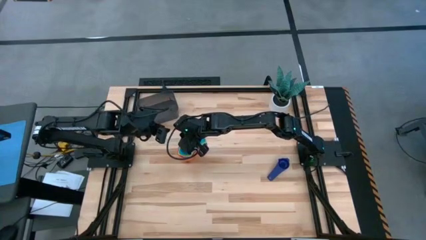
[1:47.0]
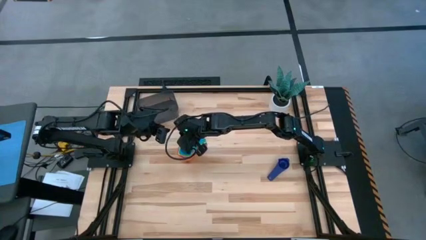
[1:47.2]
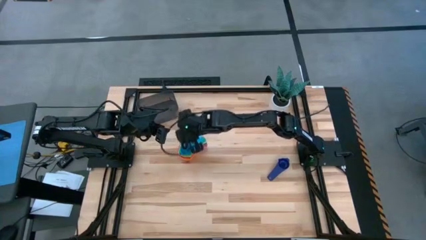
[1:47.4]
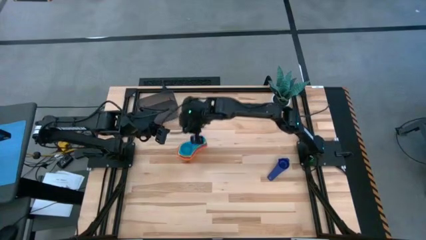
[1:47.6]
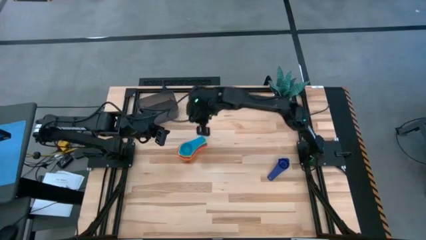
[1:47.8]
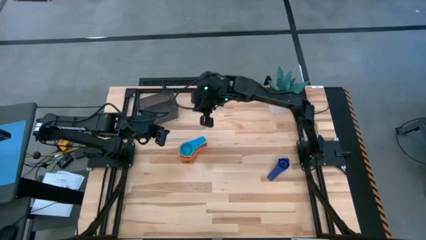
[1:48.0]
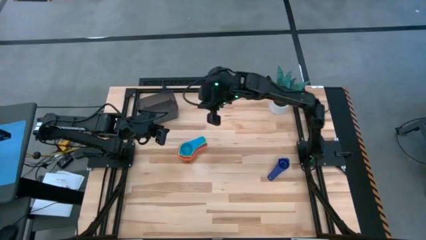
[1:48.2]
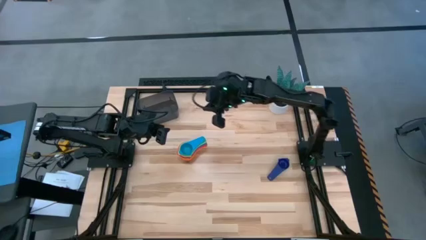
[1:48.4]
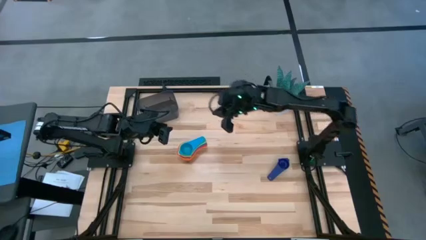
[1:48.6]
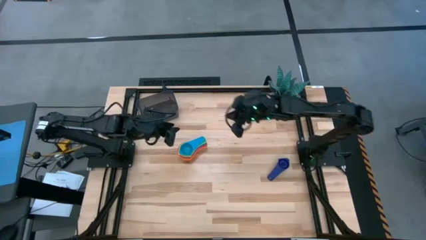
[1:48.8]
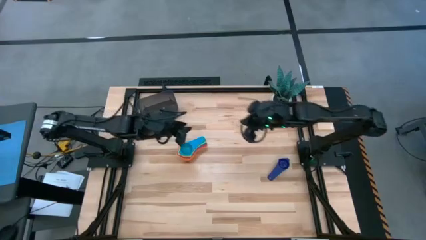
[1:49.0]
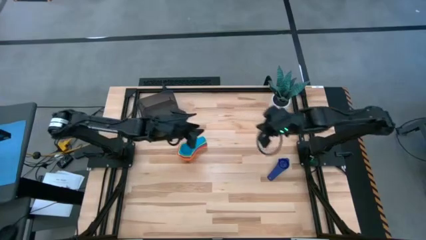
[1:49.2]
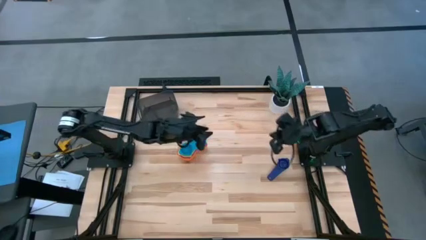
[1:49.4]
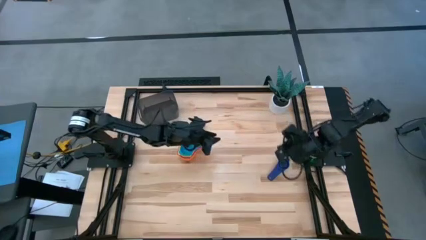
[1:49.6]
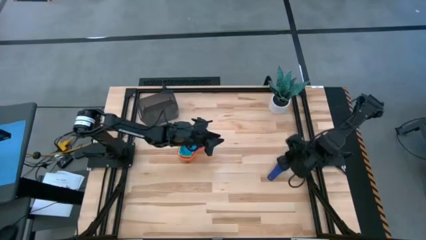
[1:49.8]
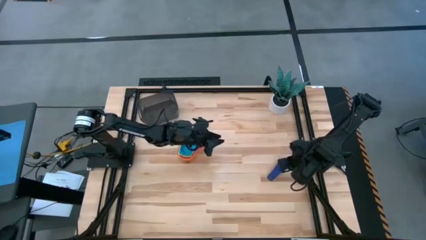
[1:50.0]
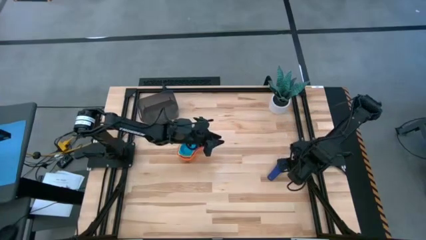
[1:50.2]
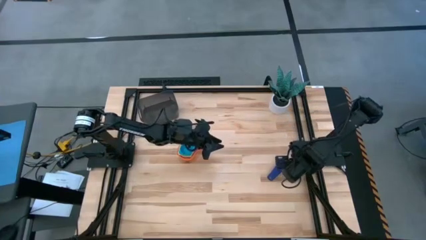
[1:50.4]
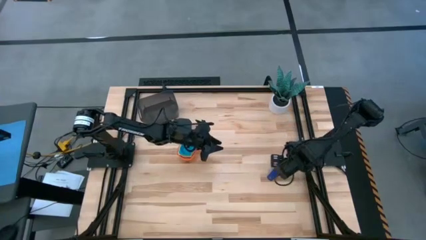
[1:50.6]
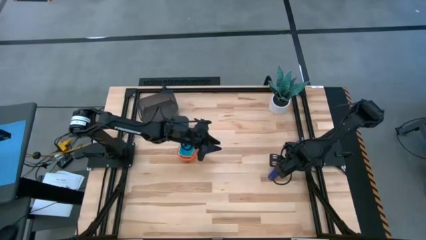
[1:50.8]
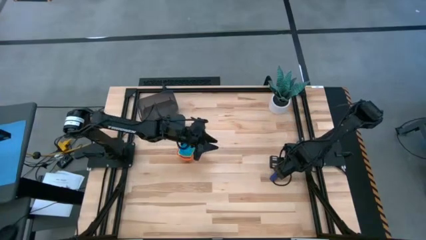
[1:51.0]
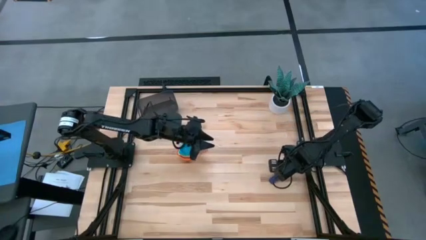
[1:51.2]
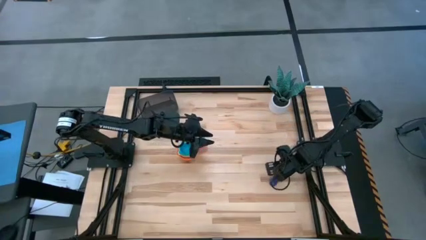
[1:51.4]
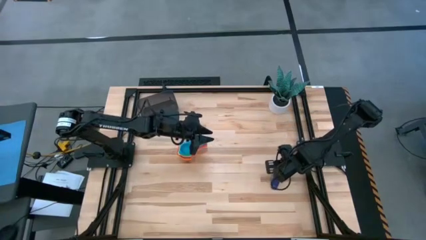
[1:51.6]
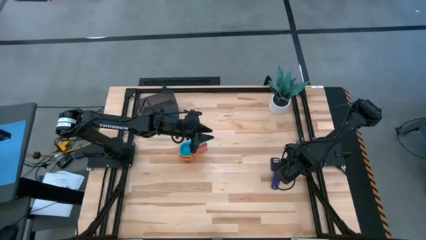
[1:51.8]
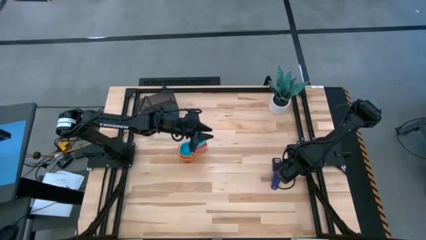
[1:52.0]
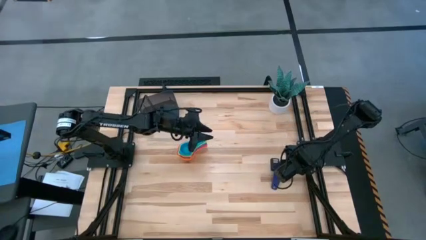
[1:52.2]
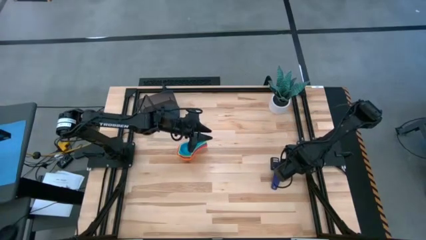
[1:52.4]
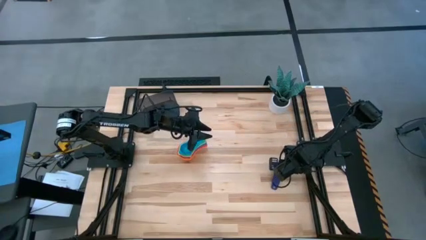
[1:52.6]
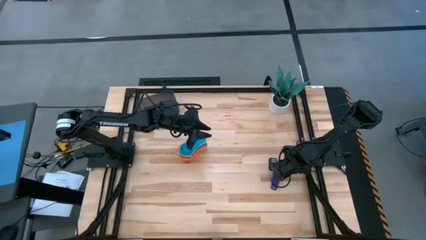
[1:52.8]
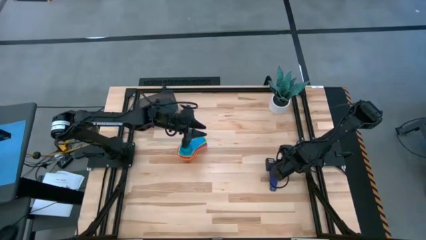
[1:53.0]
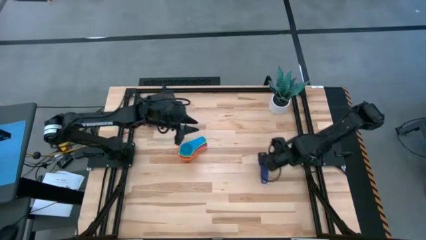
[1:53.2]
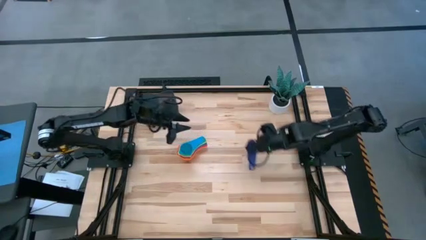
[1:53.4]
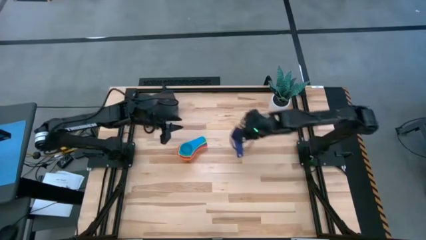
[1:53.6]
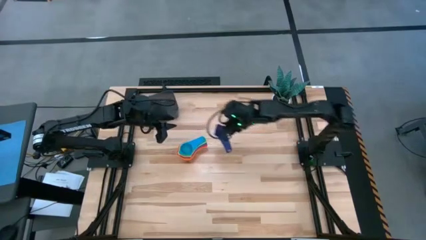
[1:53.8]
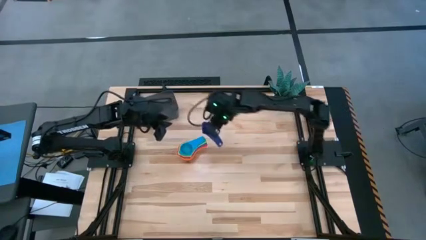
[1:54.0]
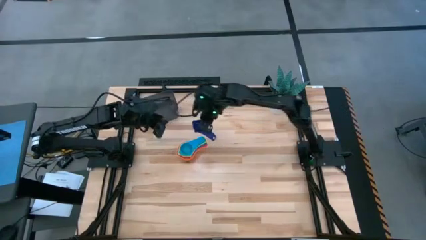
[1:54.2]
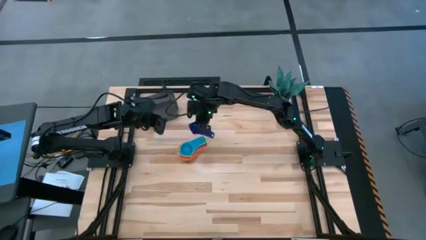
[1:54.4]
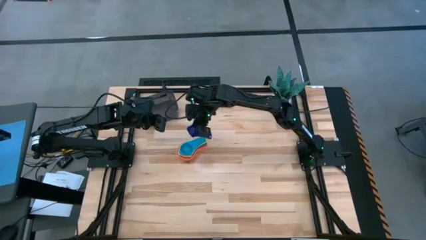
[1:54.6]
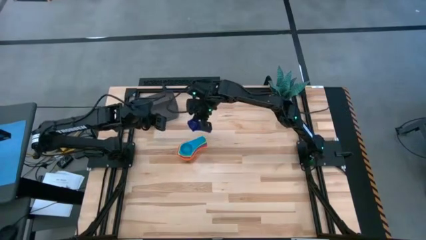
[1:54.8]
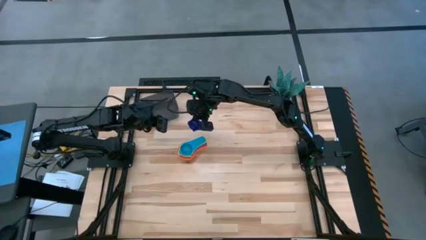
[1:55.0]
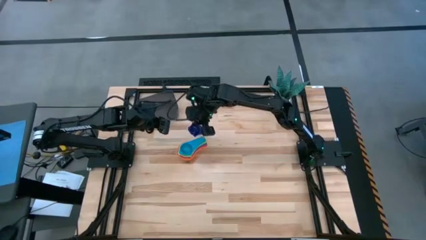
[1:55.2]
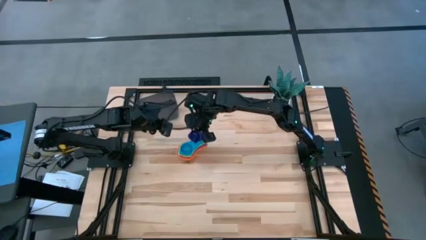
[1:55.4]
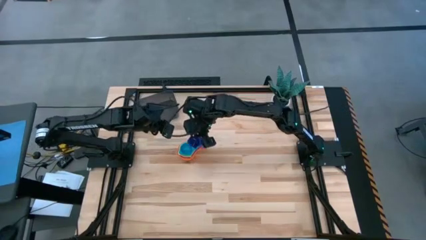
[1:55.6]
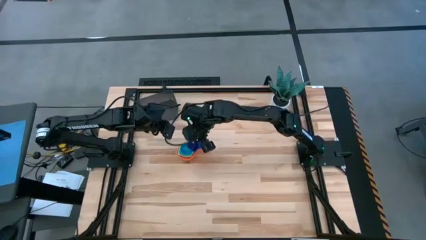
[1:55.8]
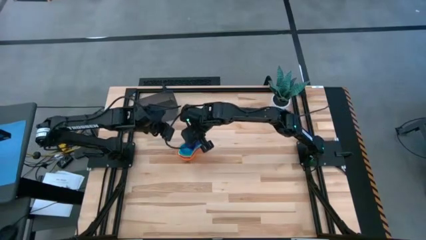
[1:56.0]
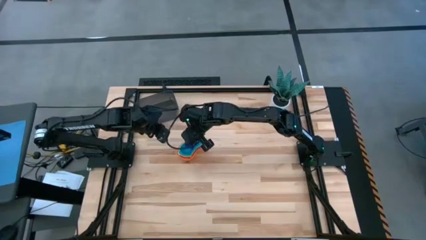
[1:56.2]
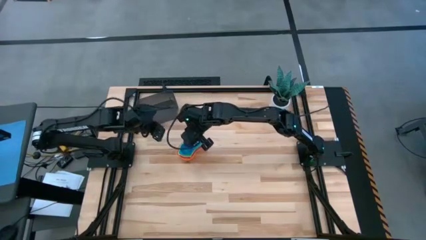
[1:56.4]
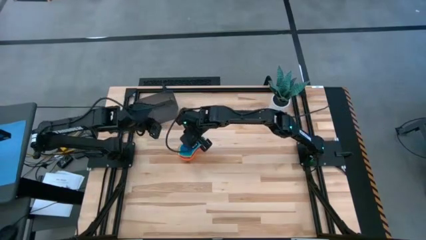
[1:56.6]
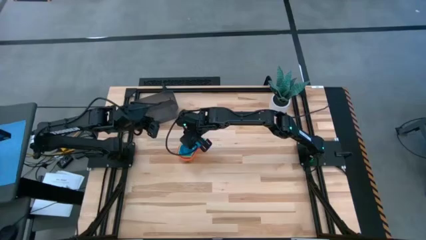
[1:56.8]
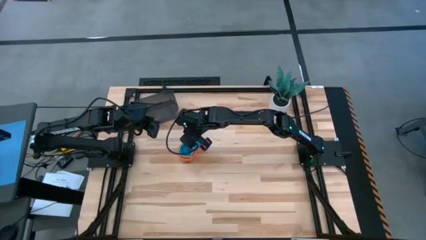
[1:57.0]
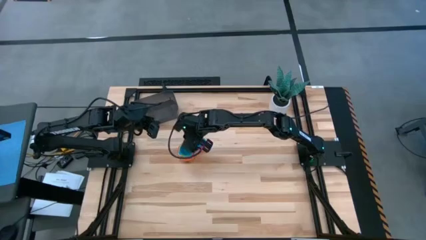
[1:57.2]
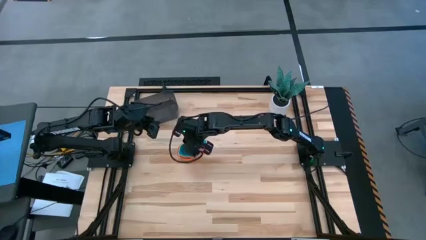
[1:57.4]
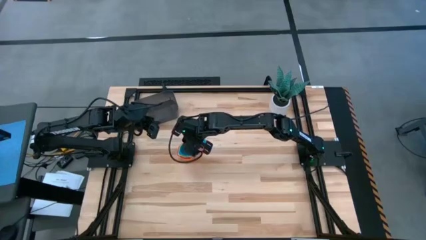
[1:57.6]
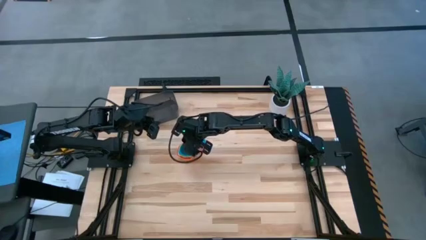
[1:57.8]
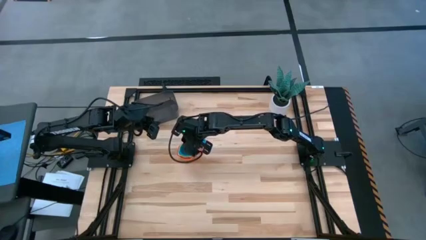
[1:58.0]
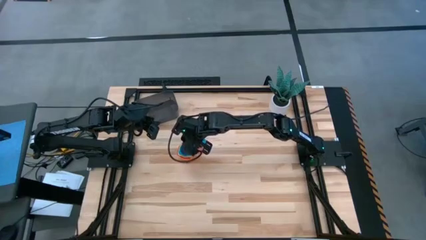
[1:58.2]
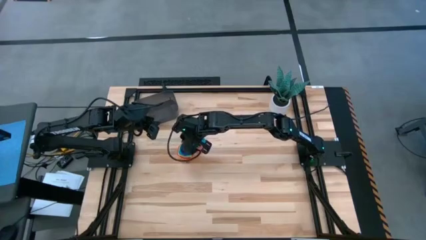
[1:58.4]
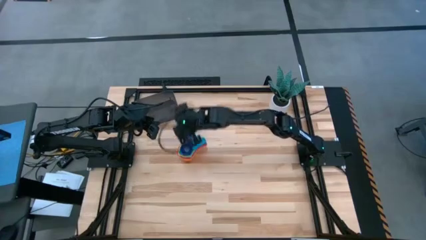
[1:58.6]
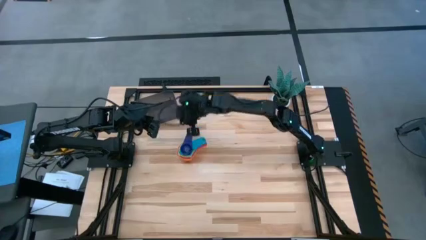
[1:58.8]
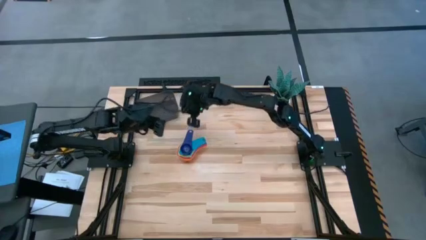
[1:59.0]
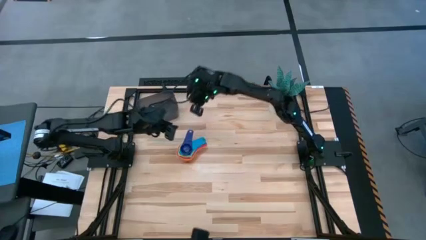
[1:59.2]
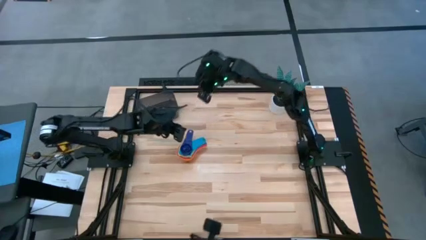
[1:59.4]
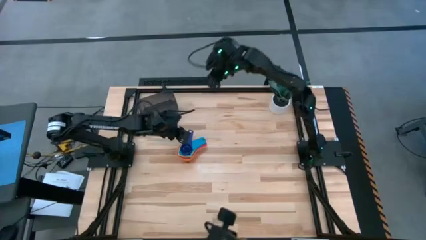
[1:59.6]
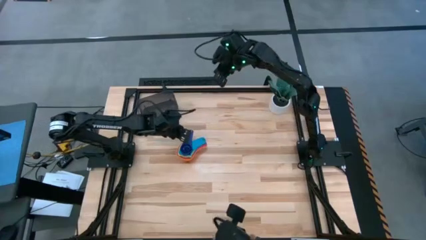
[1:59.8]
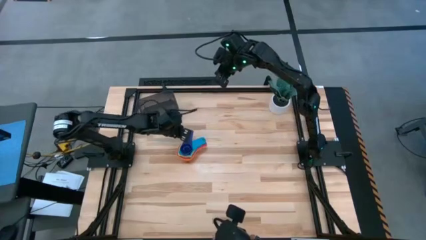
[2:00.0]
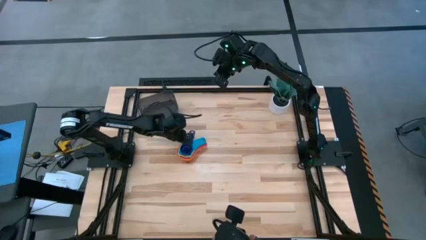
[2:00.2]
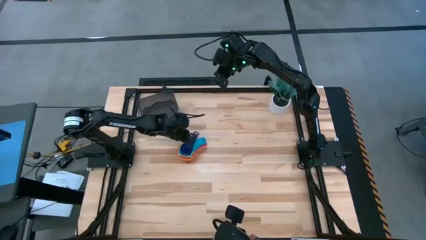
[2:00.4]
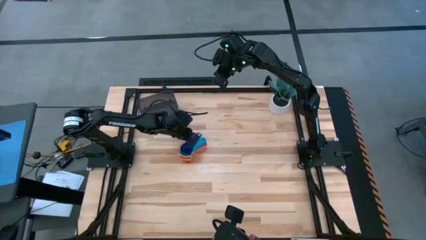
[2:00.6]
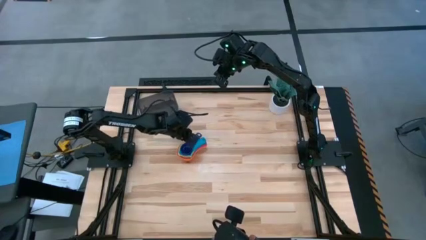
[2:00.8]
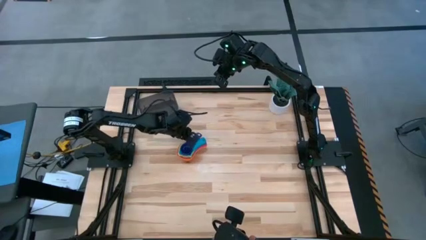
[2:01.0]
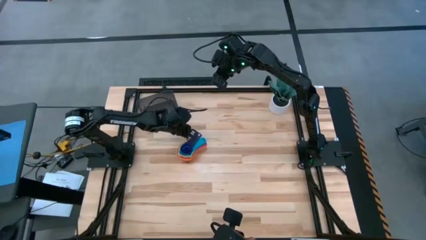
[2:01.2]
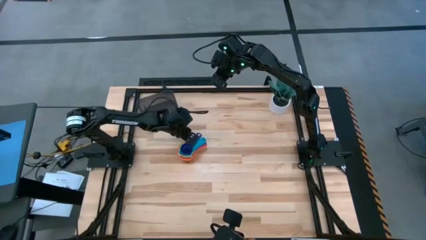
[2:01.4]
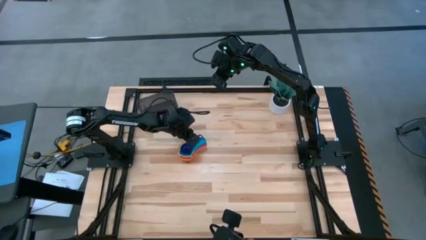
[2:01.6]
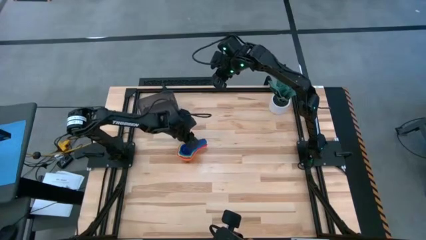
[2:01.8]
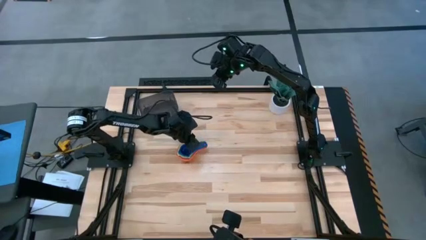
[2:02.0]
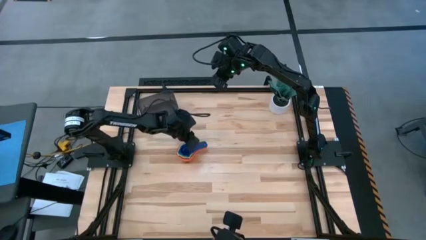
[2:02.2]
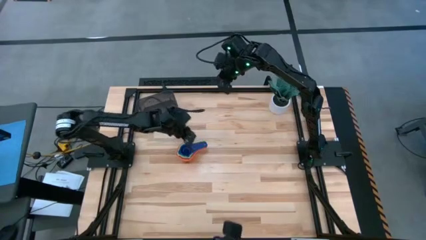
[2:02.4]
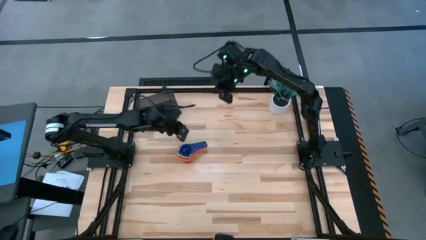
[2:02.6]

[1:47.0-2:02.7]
Task: Nest measuring cups in basket
Stack the dark blue measuring cup on top of the light blue measuring cup
